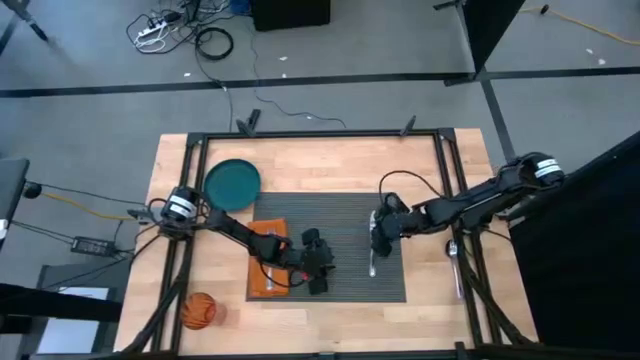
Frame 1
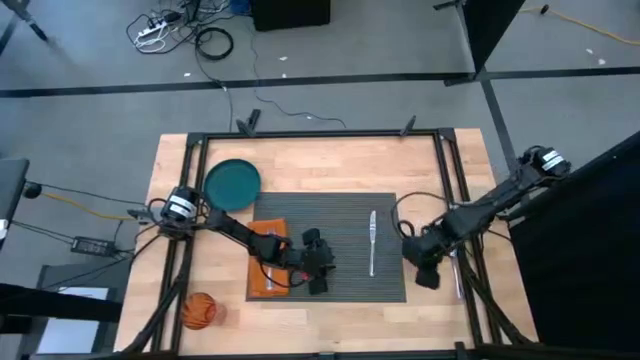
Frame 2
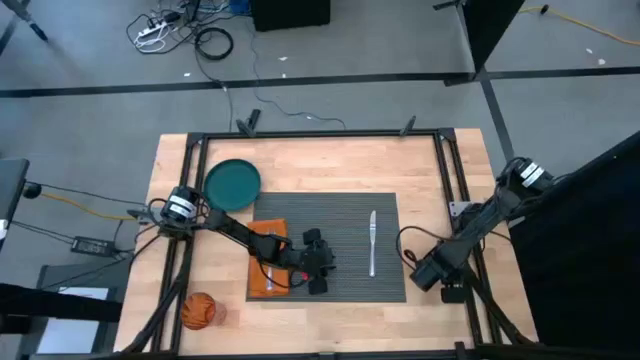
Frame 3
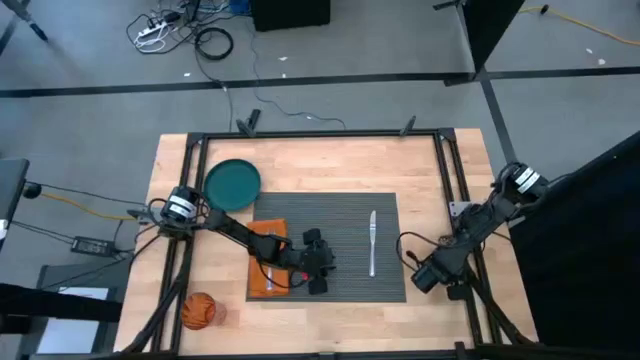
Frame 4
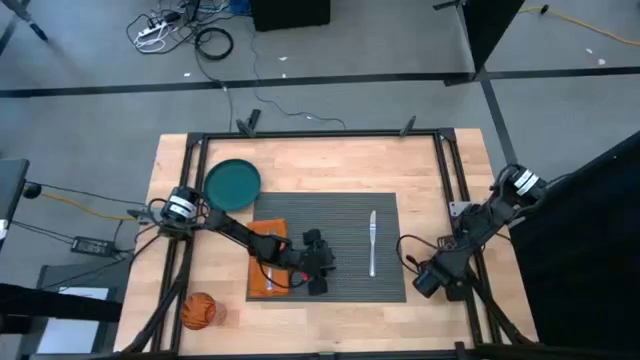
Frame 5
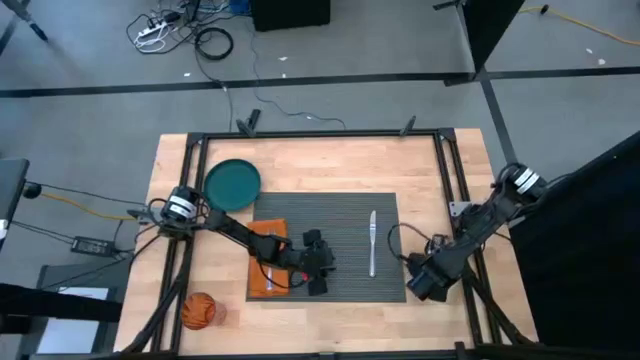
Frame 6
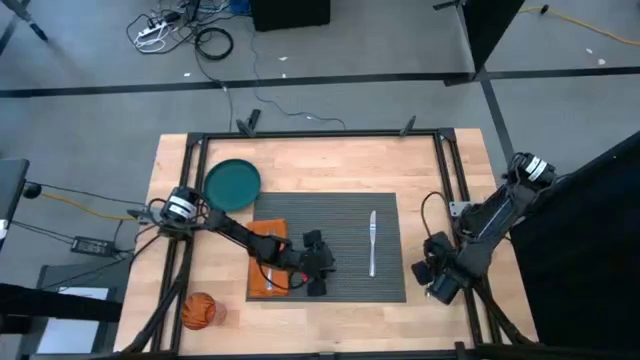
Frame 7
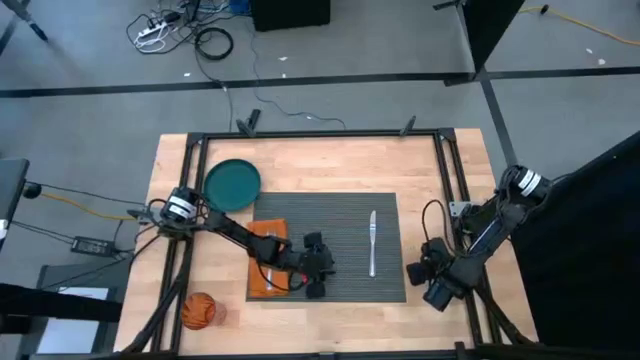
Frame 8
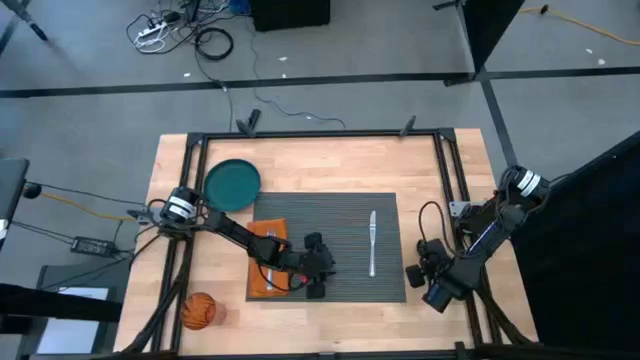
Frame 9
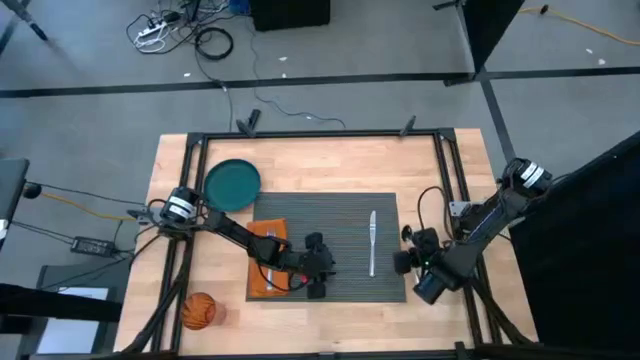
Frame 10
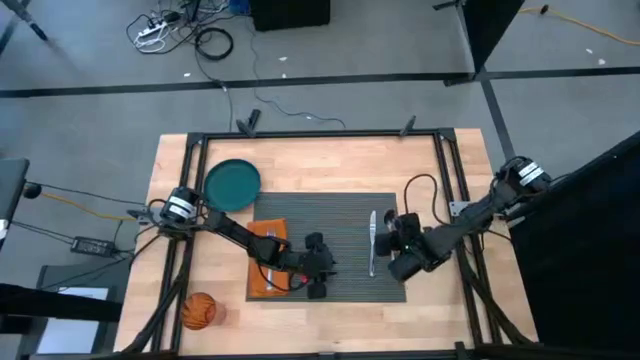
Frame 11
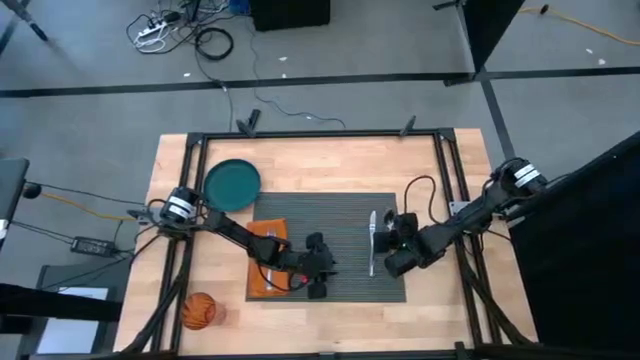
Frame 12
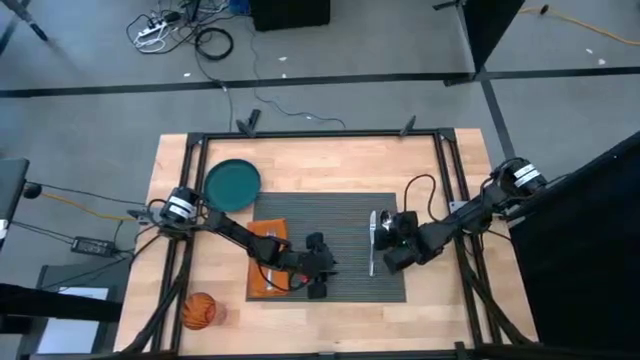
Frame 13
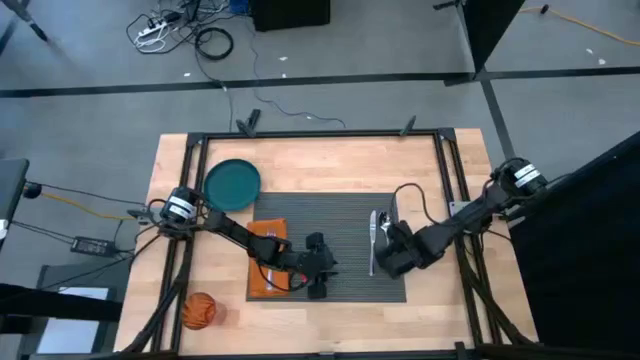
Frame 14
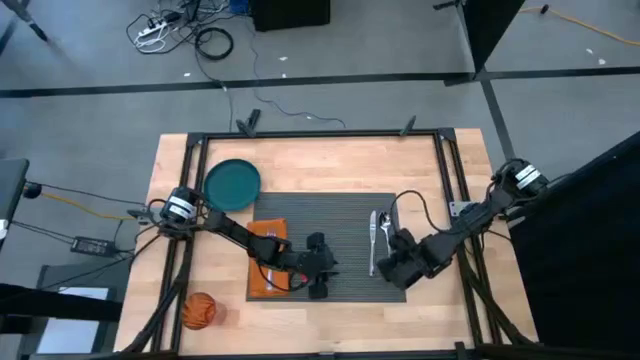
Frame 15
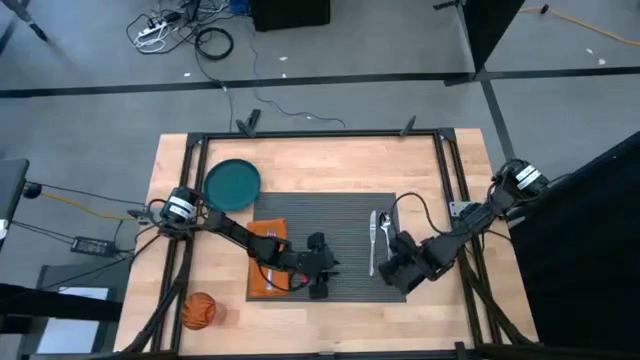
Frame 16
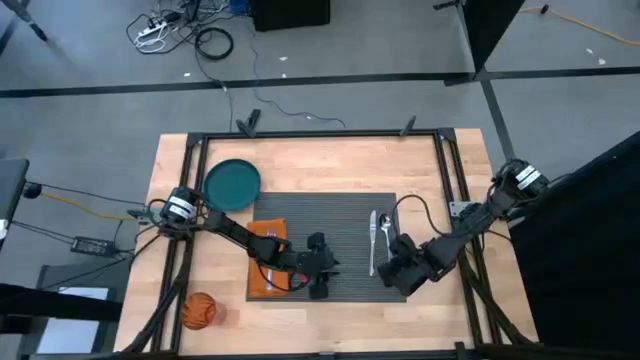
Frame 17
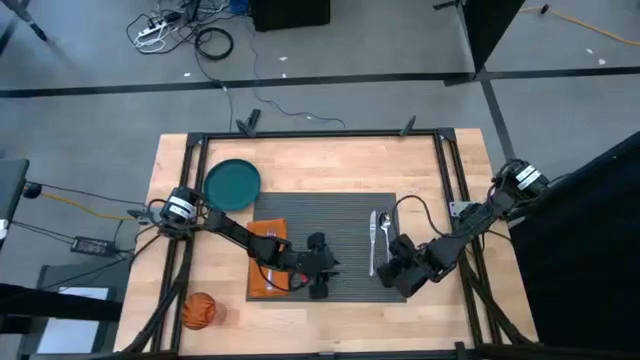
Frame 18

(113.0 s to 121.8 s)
Task: Set table place
Put the silver spoon on the gray placemat to right side of the silver knife

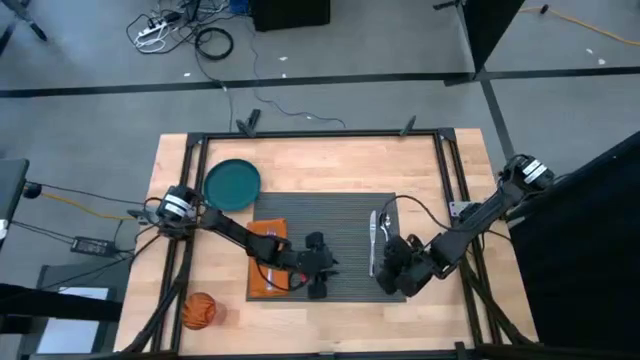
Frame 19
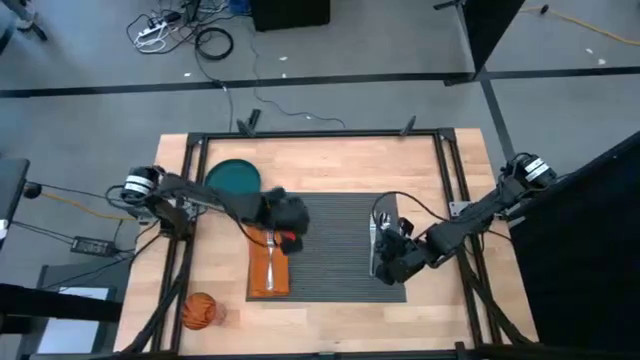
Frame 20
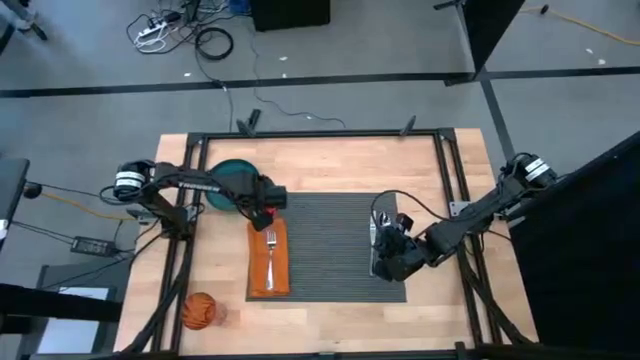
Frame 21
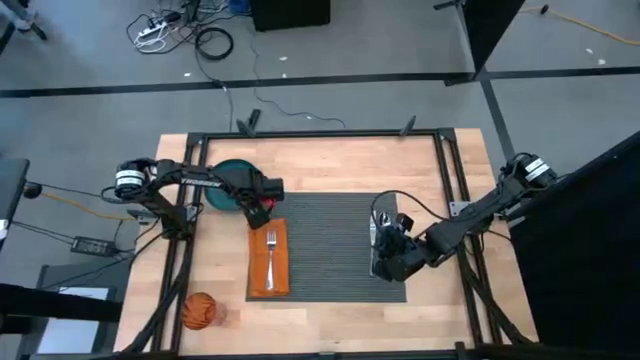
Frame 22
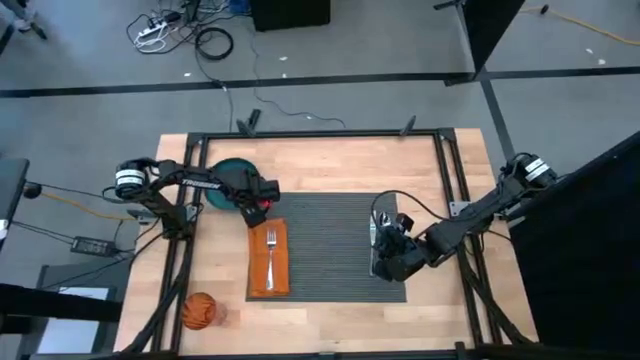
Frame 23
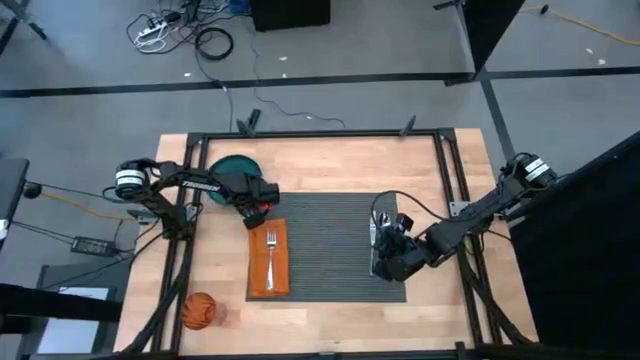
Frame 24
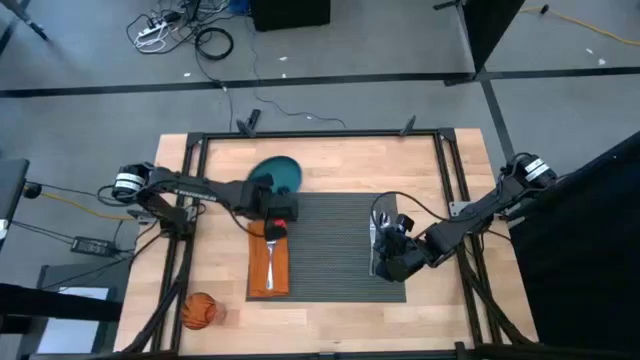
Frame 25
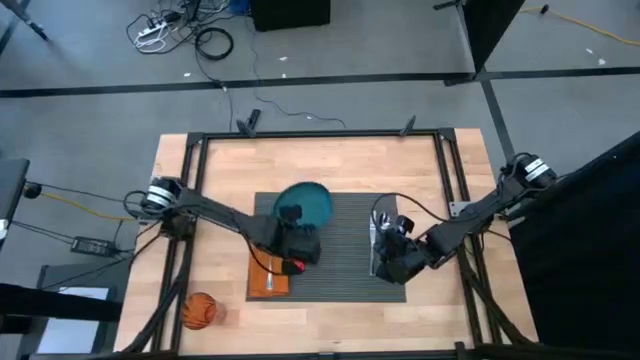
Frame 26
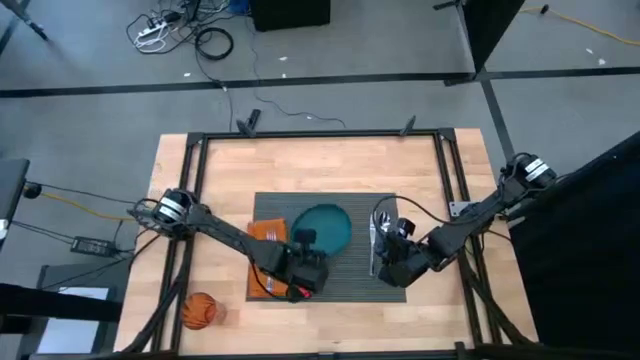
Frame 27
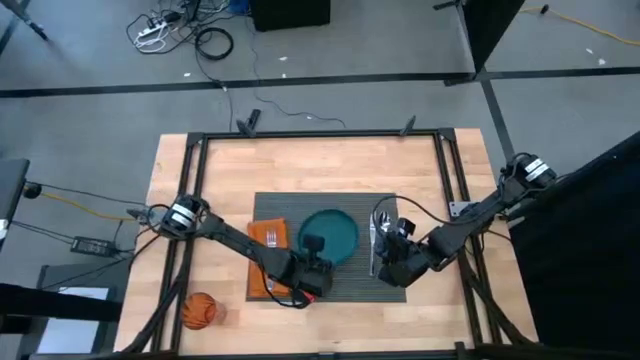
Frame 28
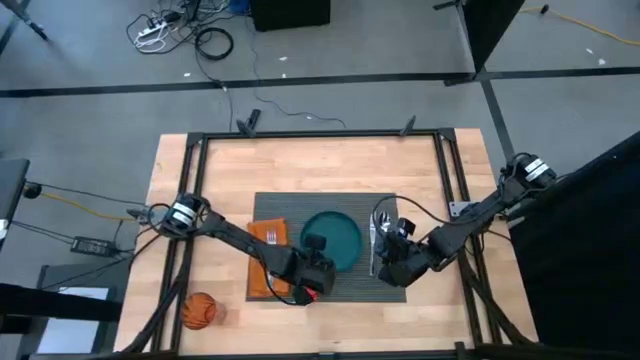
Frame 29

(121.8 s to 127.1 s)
Put the green plate on the gray placemat

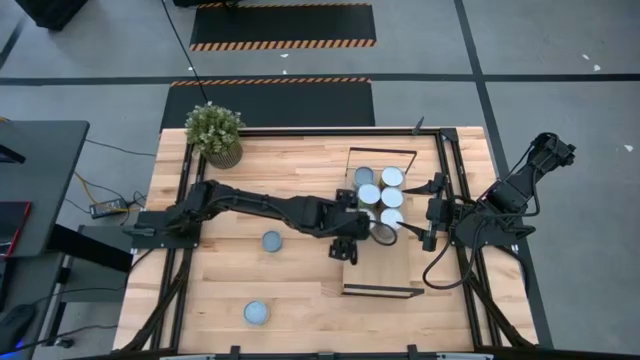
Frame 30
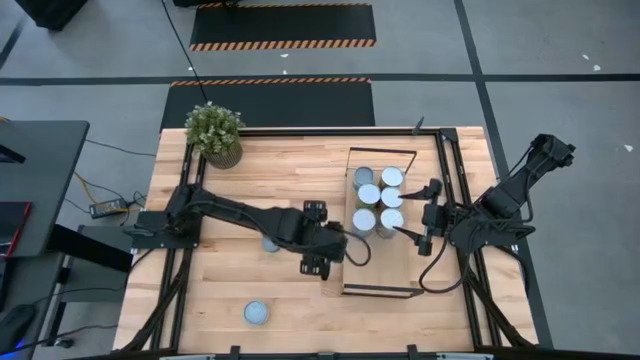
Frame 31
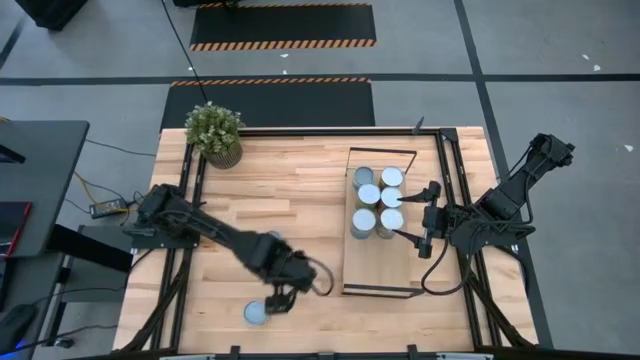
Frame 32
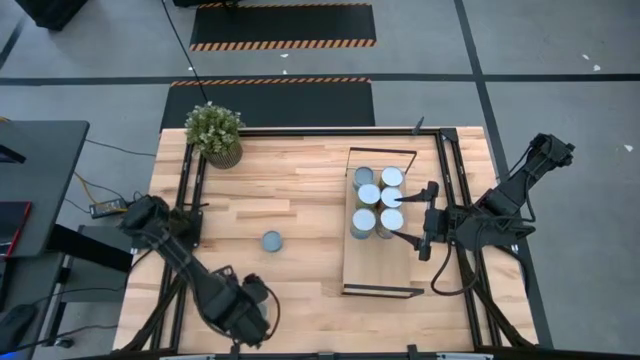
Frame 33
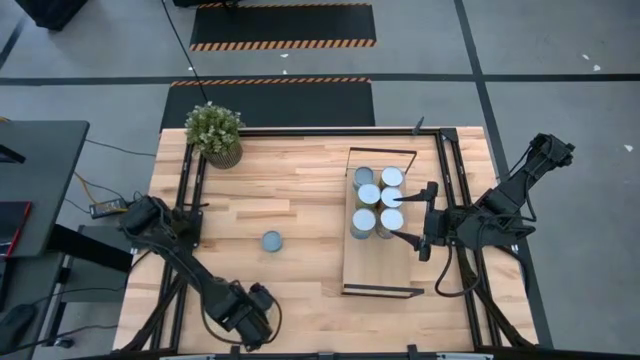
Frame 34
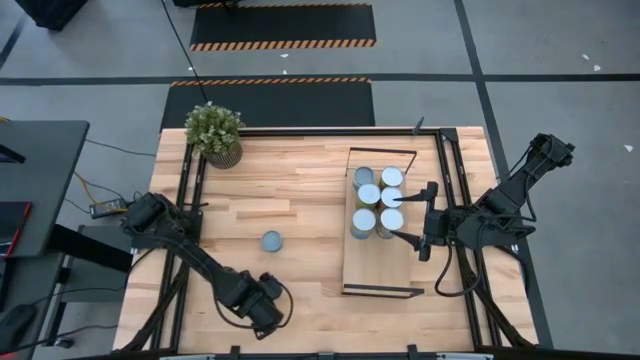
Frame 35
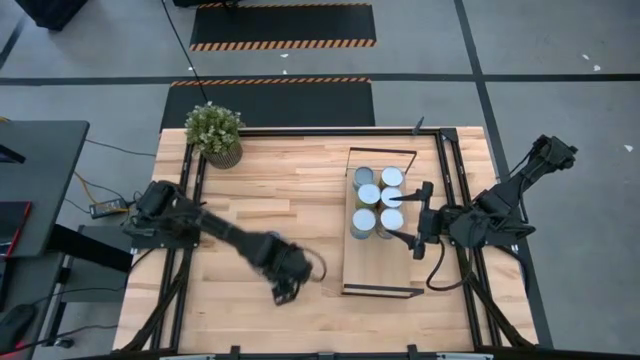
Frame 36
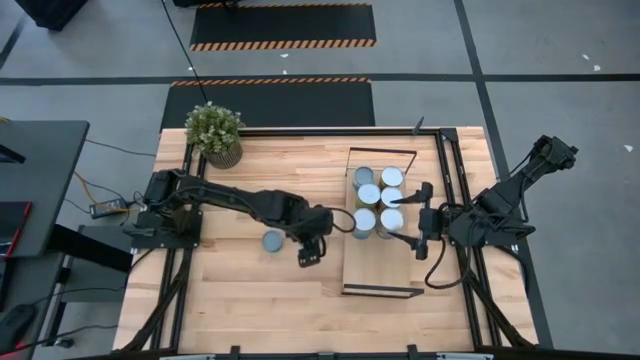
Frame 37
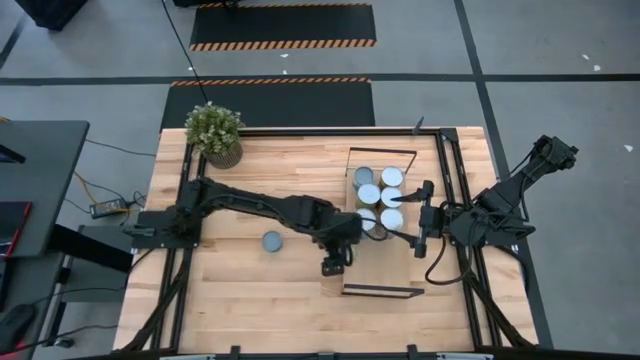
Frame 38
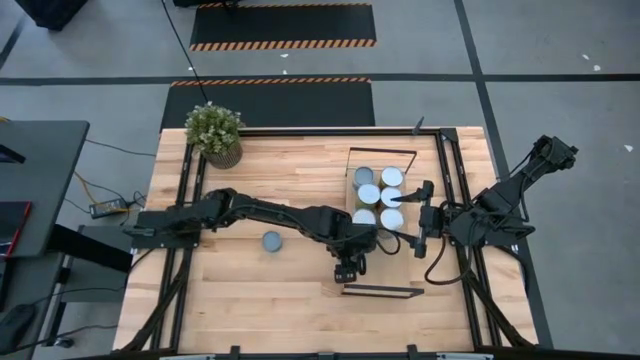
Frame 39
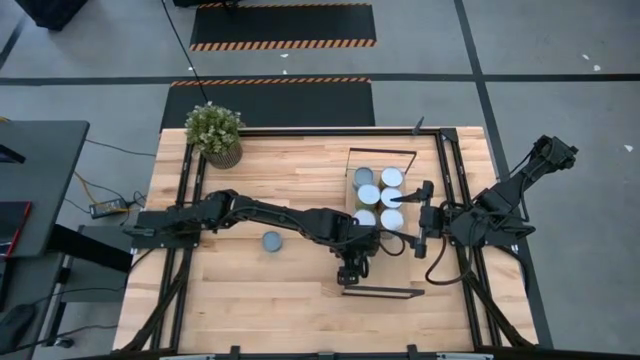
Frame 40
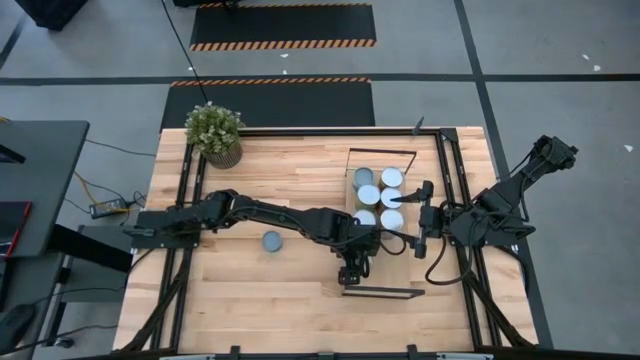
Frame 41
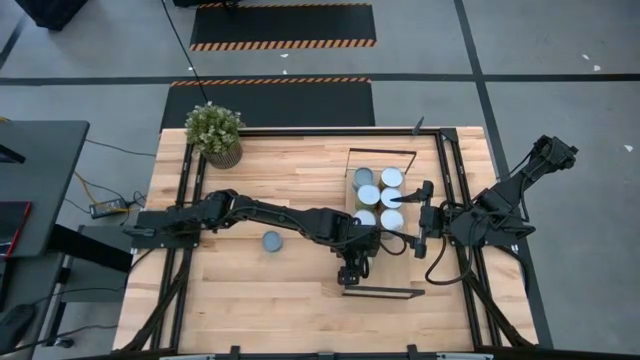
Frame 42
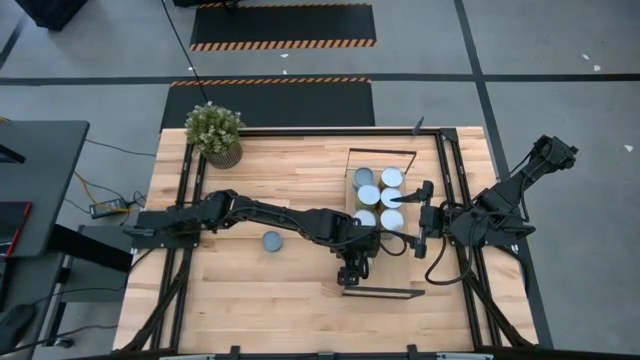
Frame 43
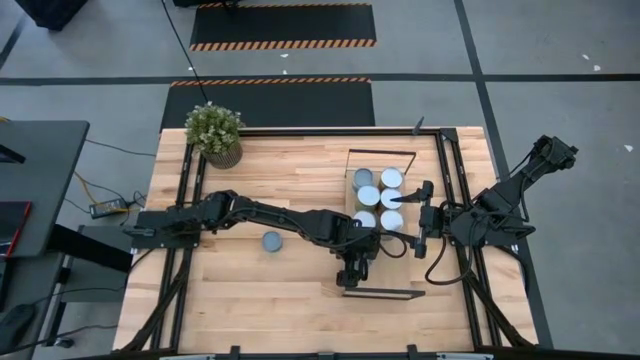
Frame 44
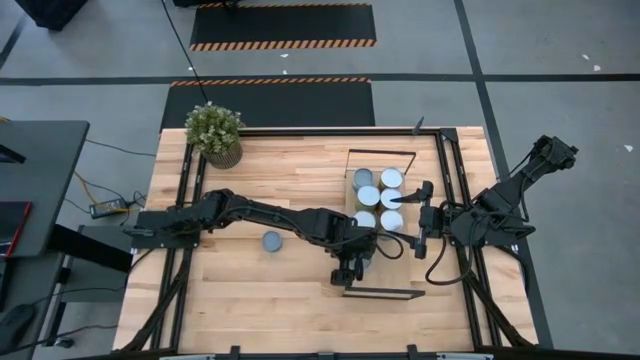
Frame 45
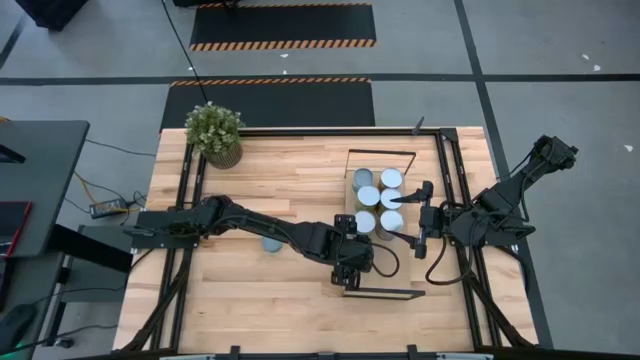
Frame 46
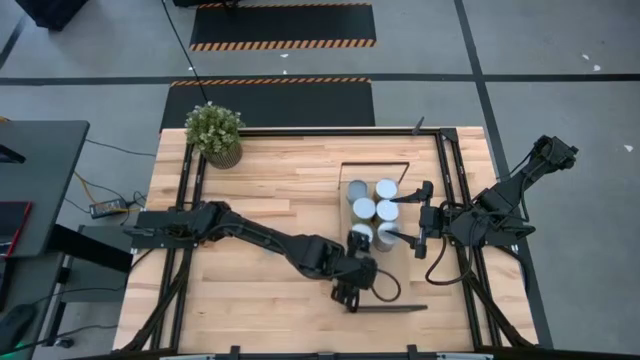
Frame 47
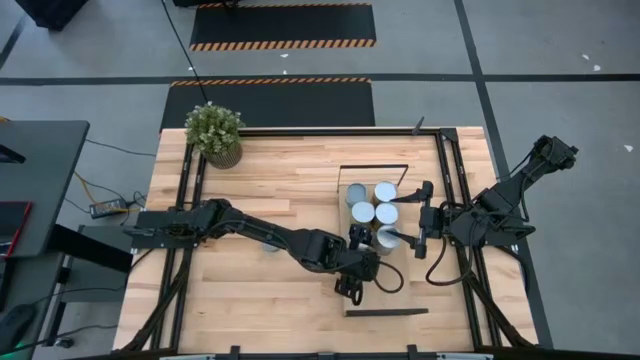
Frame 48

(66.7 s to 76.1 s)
Task: Pick and place cans onto a shelf
Put the canned chicken soup on the shelf
